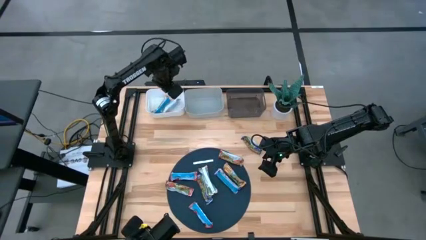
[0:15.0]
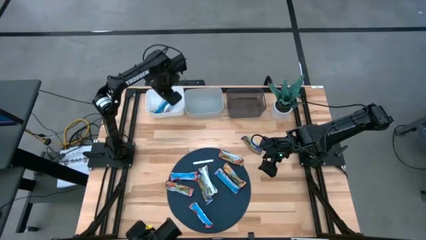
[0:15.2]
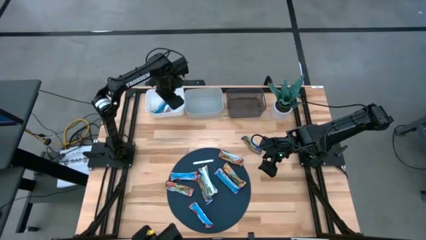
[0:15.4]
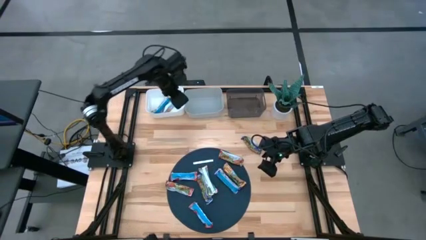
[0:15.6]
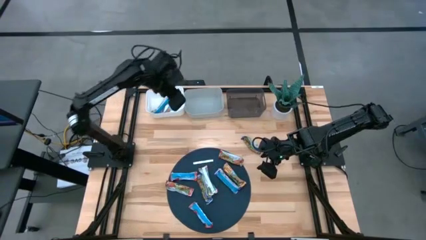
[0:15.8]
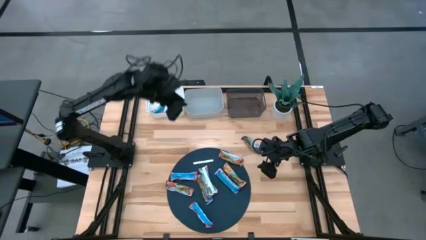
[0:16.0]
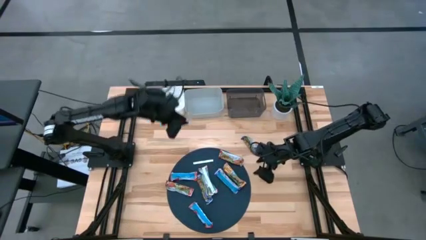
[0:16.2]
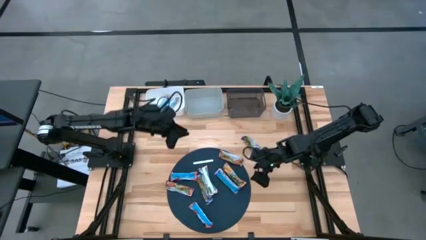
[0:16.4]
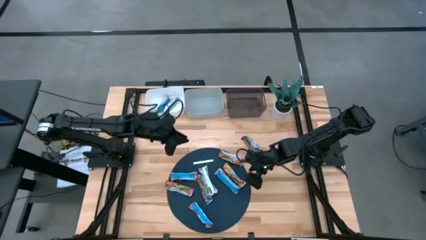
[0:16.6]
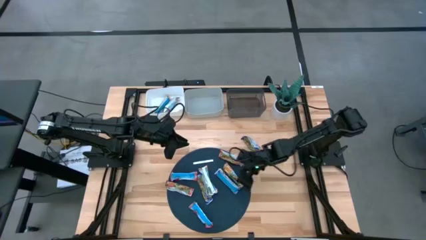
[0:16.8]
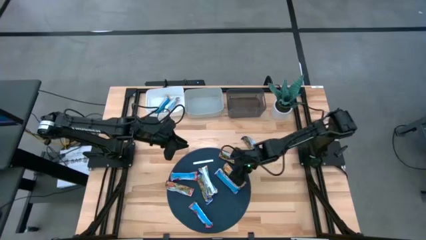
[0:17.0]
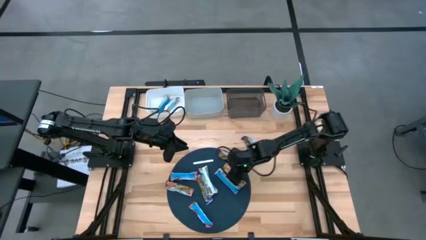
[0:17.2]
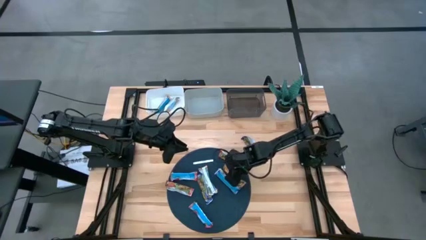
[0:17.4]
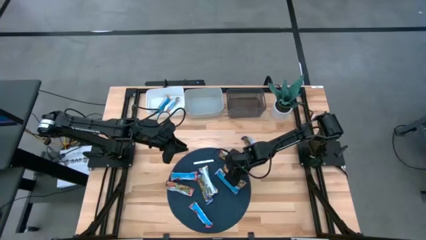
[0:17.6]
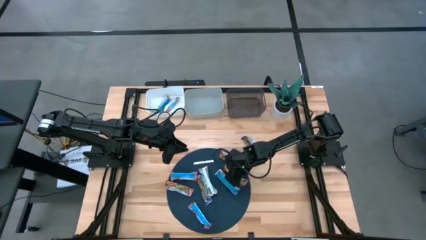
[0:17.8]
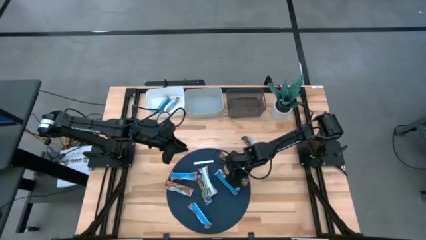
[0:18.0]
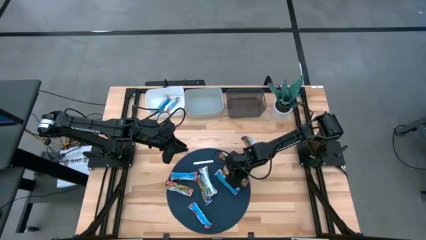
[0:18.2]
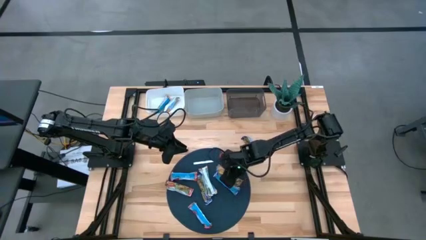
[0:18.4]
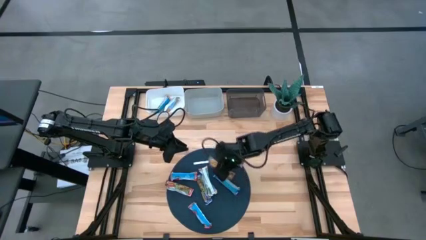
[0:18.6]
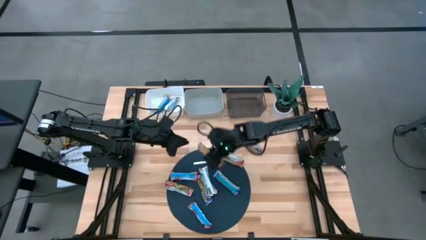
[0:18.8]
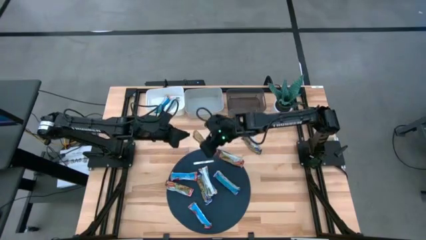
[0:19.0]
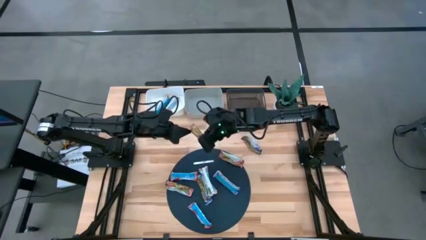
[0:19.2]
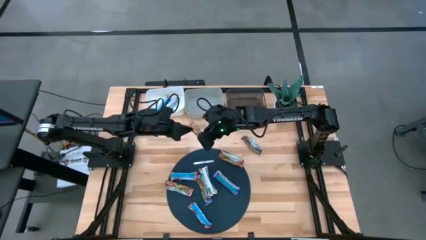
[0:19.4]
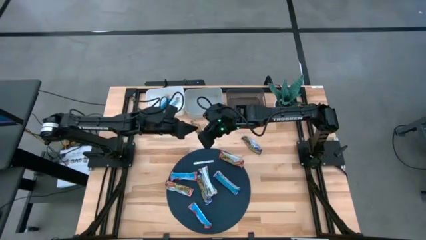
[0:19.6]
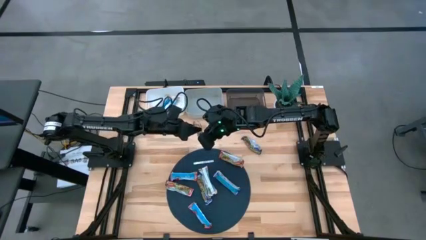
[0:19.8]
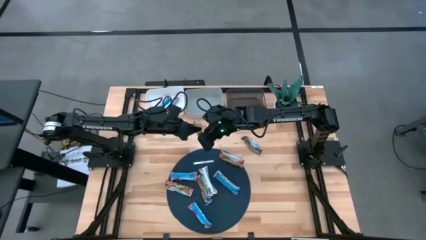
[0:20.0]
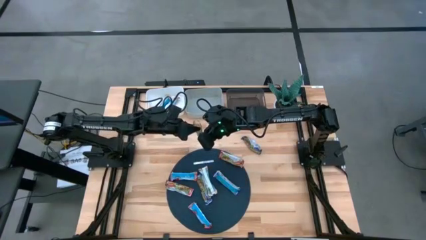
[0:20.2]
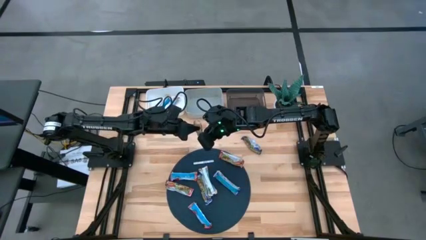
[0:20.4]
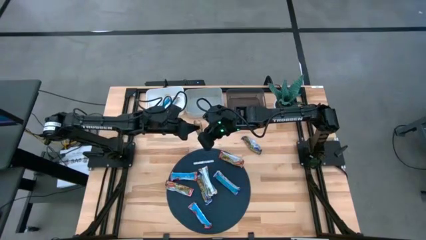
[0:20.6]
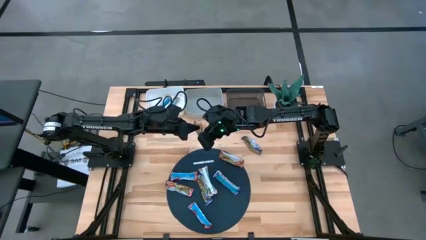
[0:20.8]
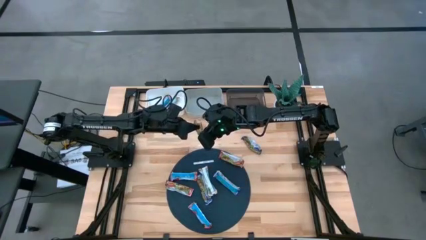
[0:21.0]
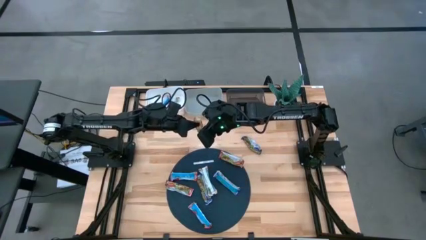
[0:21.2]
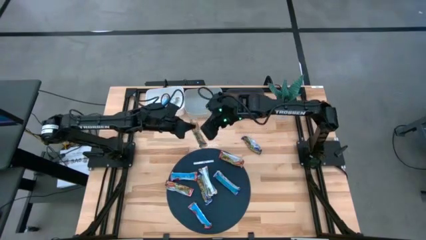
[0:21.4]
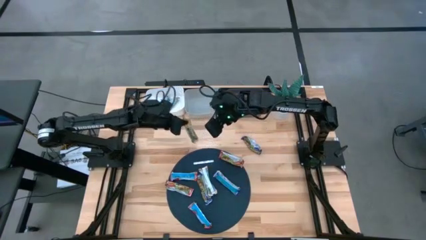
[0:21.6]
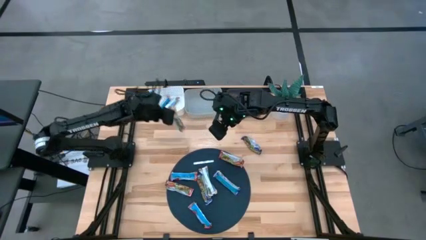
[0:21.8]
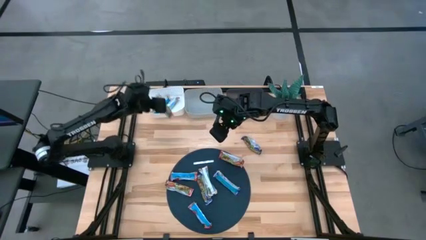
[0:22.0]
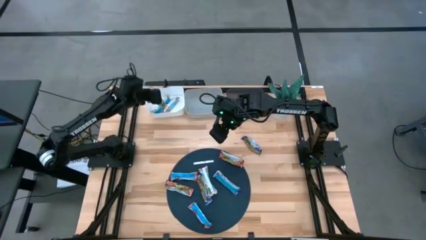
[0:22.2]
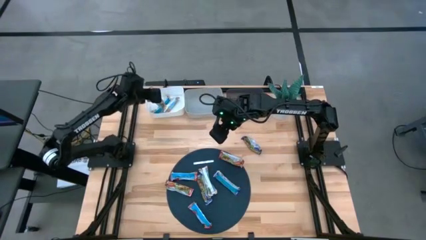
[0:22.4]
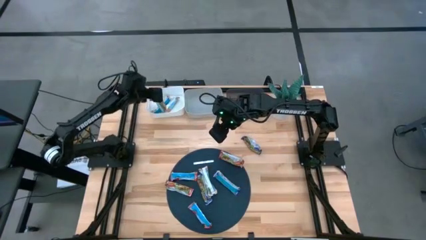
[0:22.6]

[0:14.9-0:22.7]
Task: Pick and place Granola Bars by type
Put the orange granola bar into the white bin

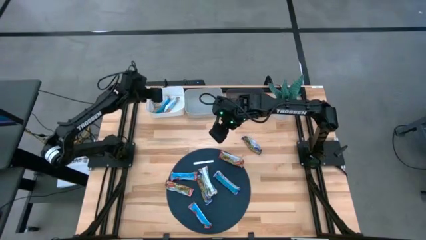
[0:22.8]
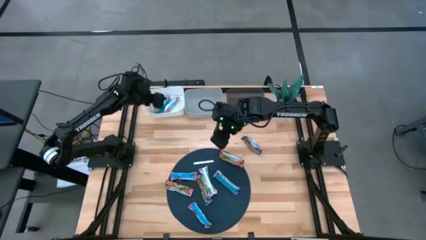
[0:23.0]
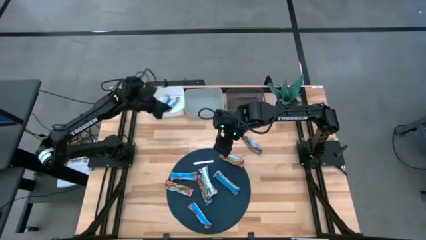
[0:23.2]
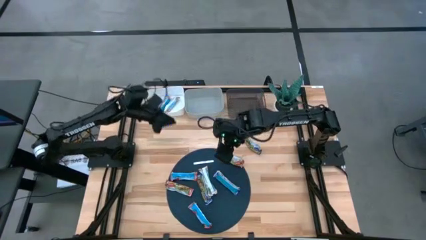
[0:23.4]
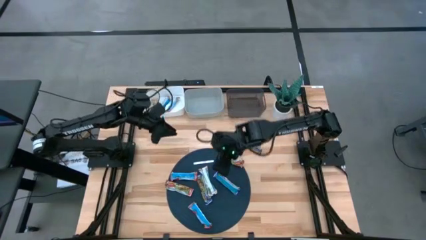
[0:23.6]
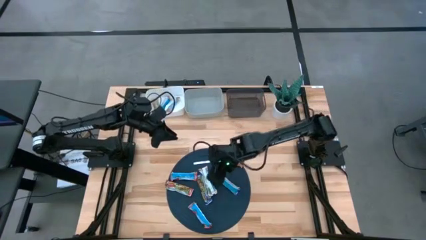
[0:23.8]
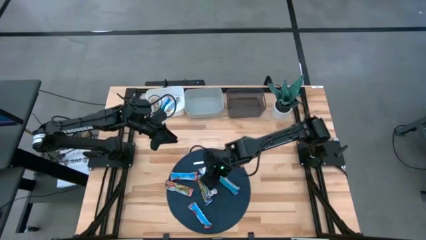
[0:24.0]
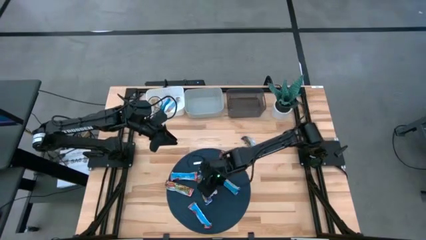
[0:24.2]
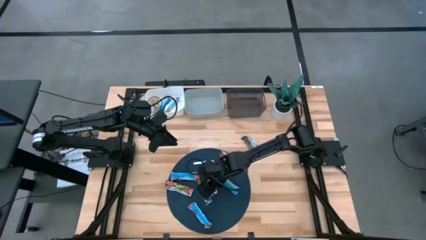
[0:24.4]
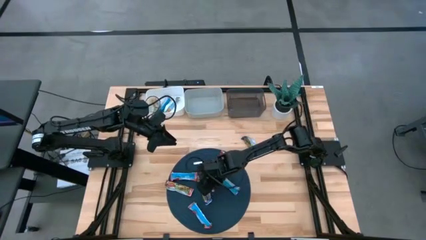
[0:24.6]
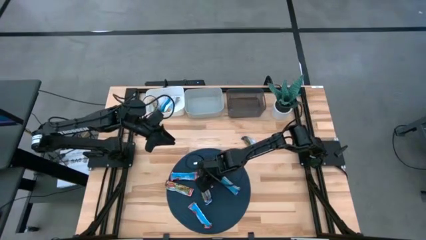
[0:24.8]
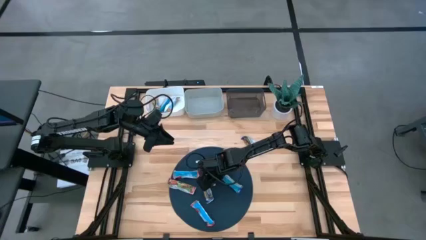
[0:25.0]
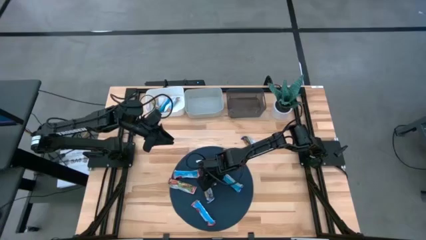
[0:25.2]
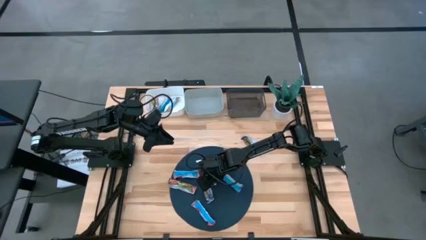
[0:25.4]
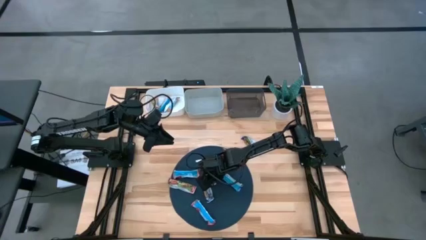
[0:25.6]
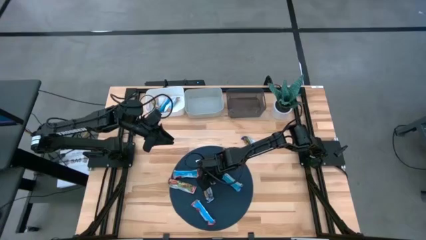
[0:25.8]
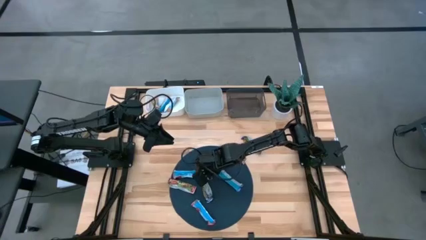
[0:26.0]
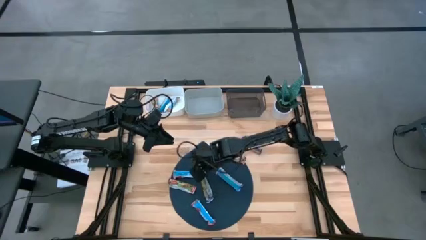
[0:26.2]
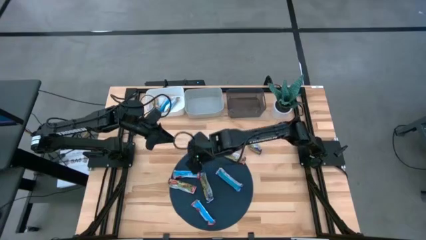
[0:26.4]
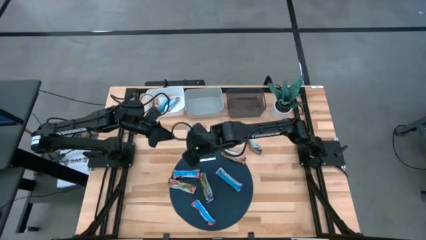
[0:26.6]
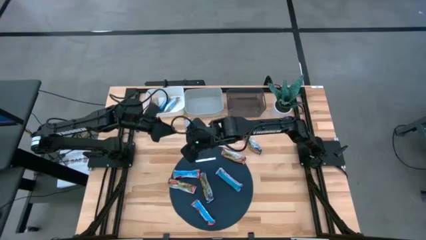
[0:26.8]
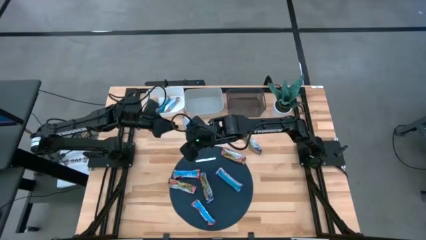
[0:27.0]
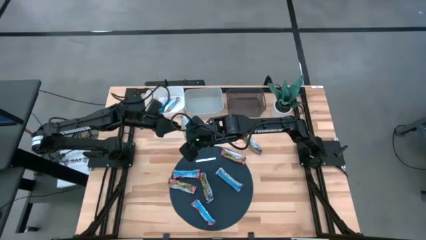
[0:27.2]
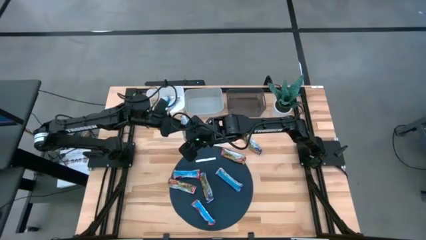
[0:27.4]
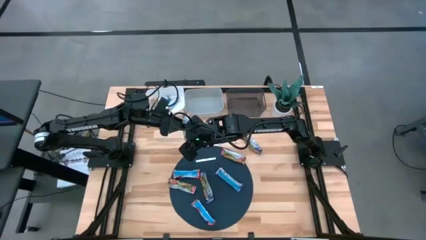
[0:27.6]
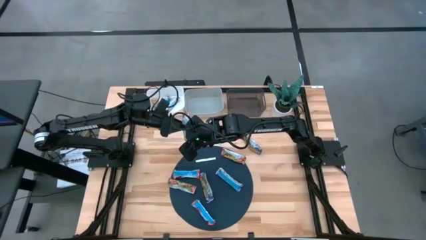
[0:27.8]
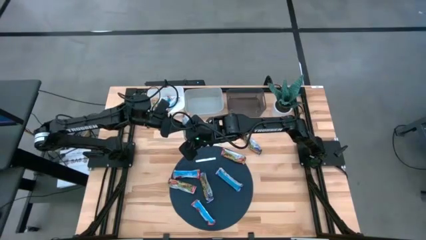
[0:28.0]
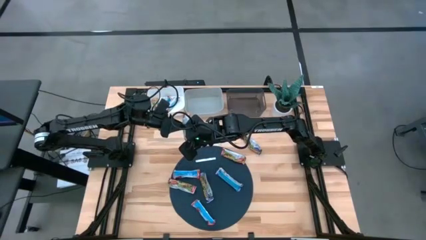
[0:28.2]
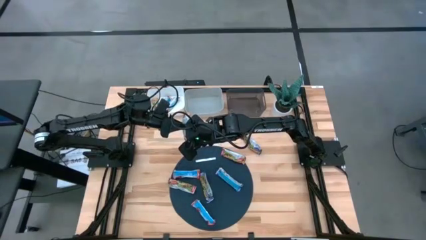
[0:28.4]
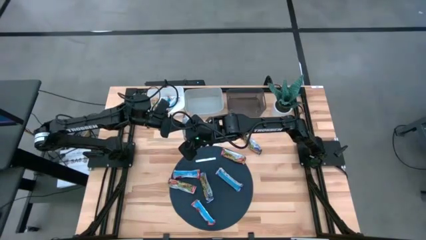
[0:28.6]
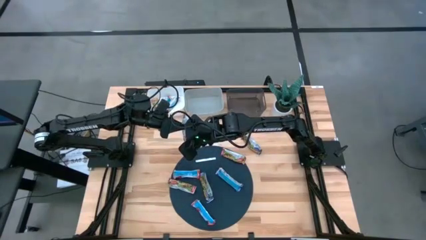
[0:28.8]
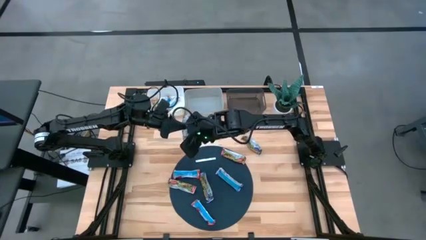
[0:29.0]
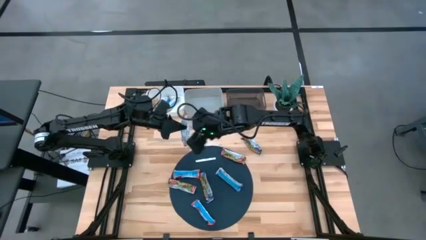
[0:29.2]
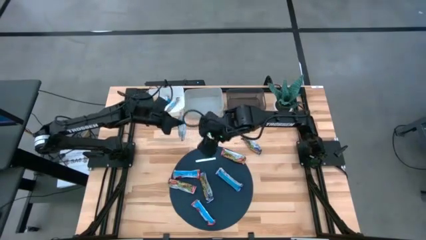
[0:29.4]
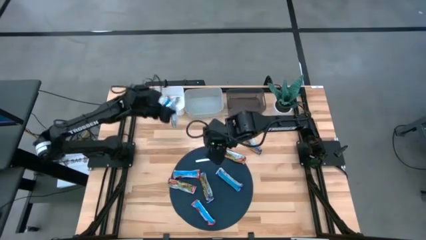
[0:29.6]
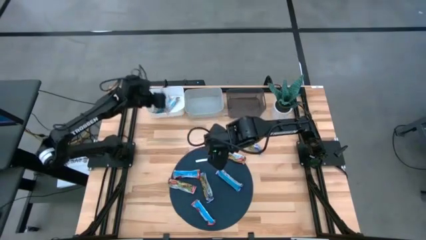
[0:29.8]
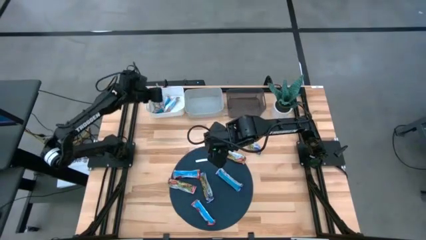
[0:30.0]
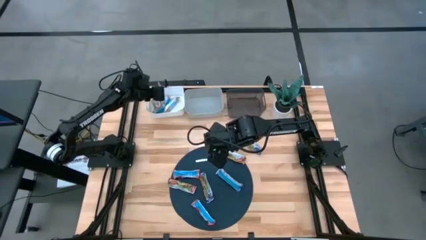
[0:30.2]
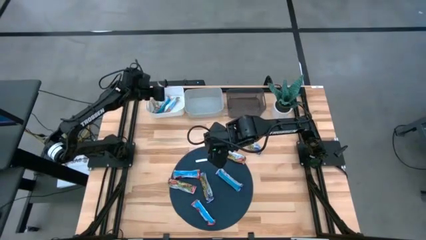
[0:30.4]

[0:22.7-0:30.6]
Put the orange granola bar into the white bin
